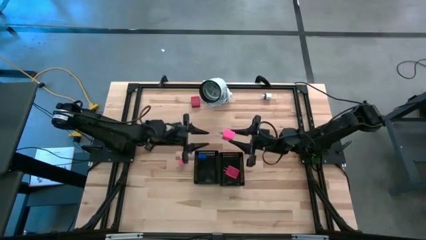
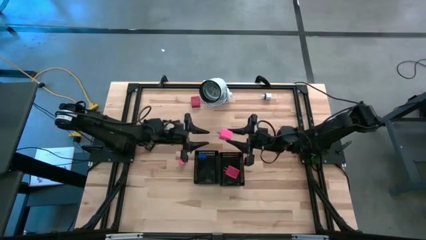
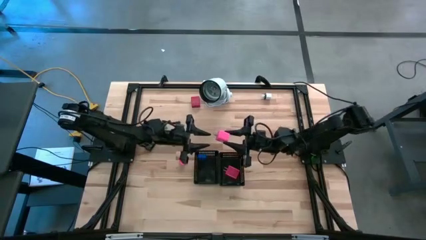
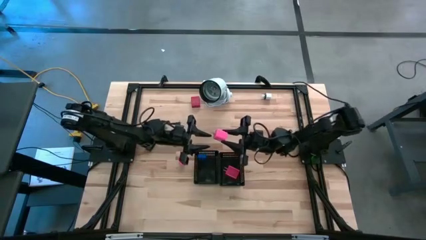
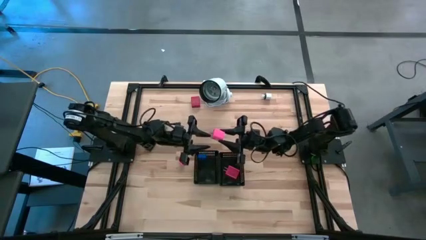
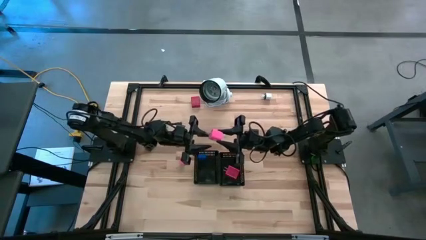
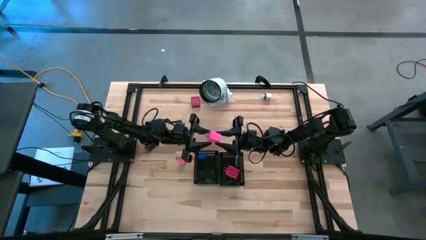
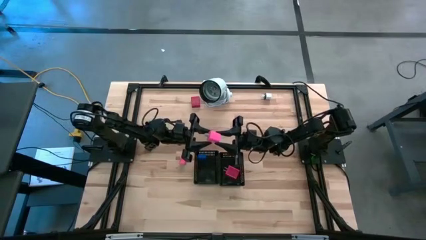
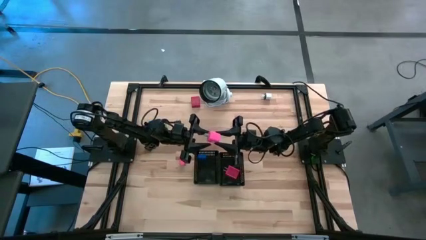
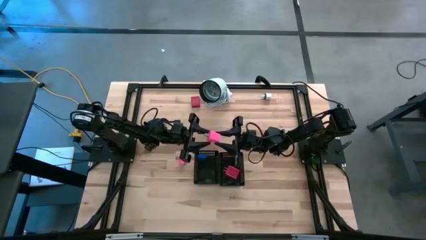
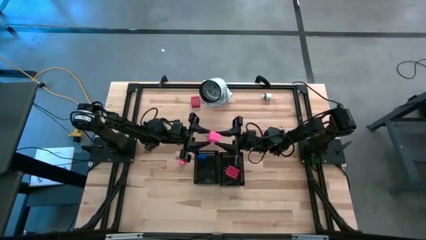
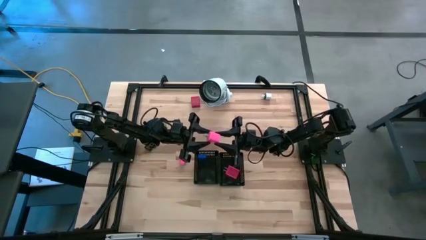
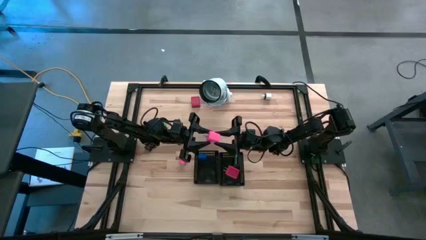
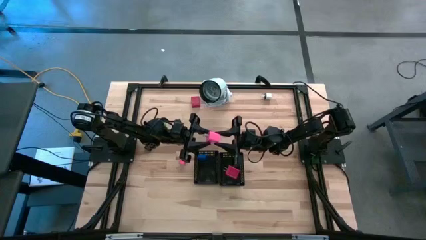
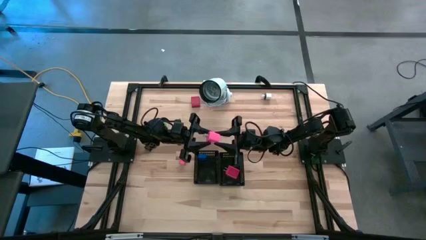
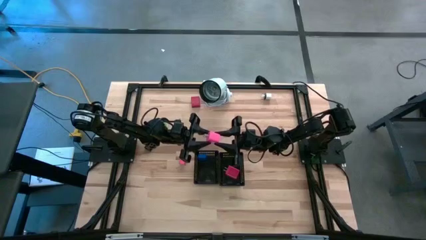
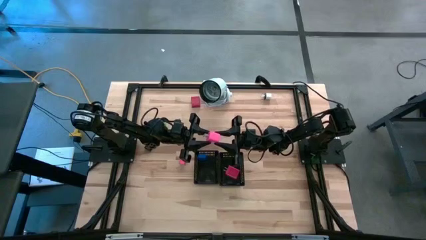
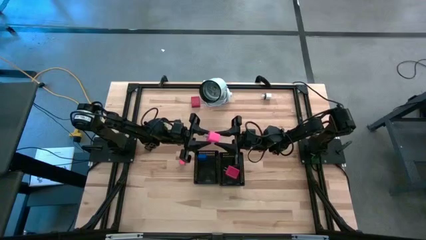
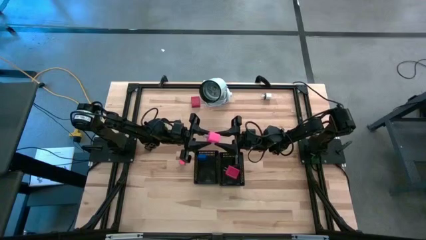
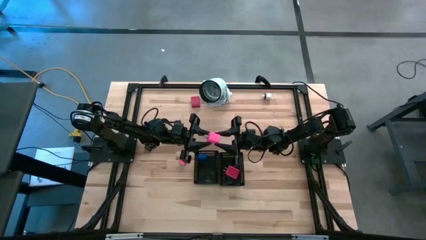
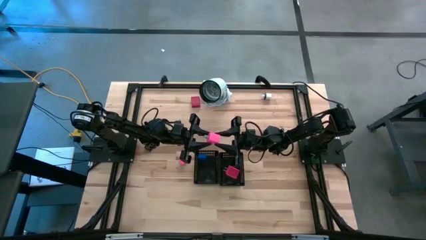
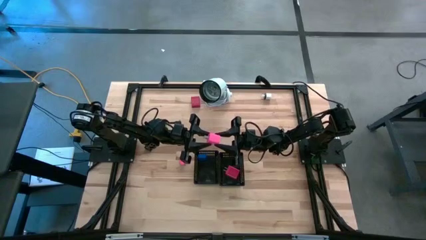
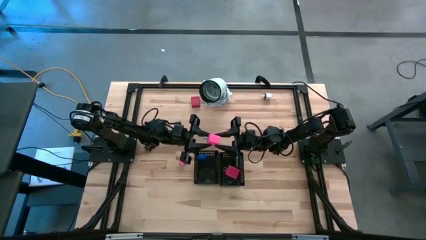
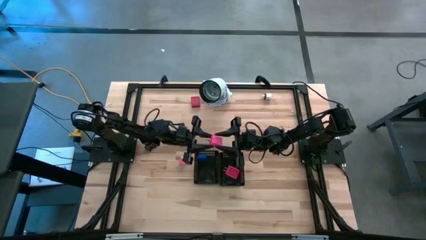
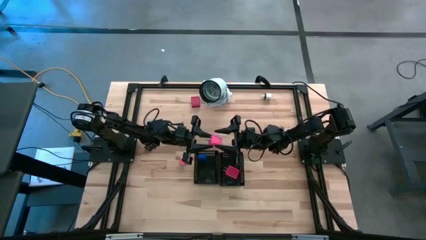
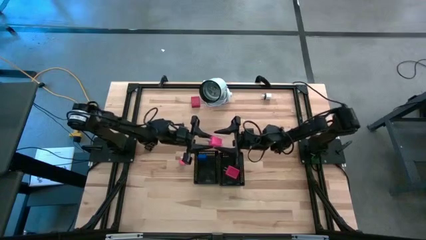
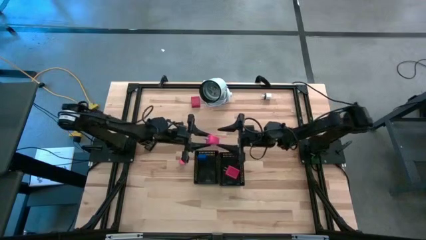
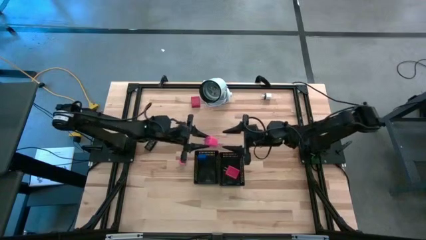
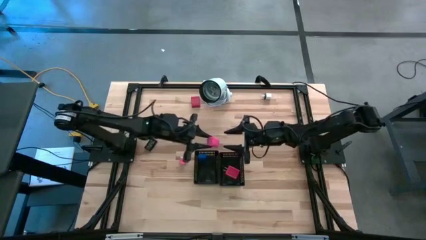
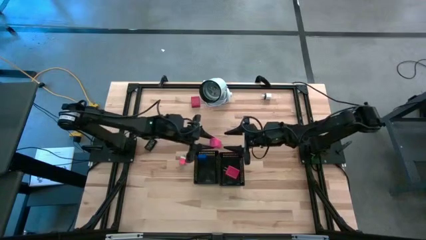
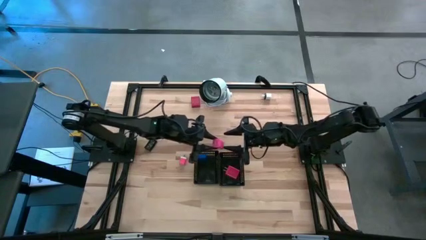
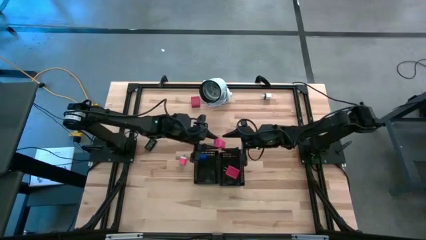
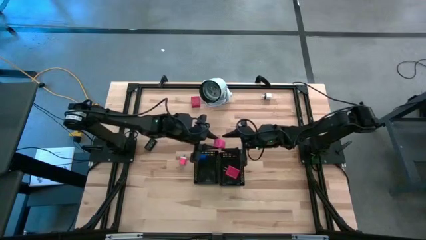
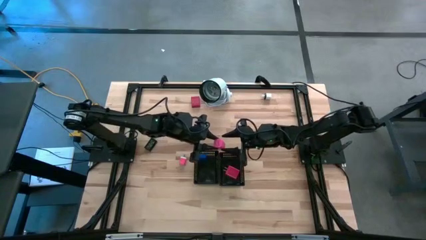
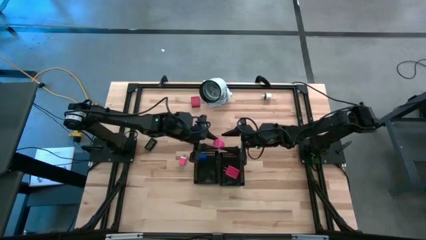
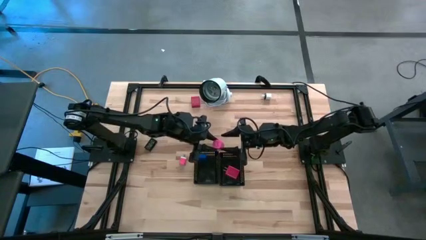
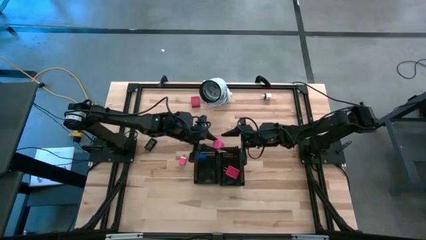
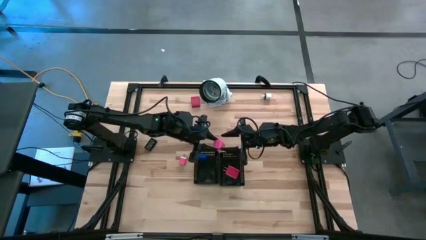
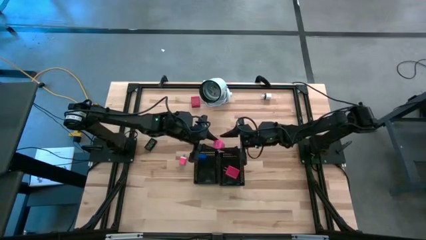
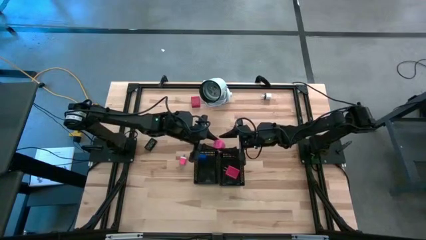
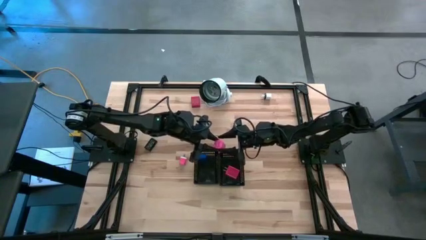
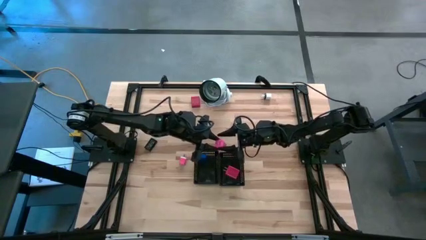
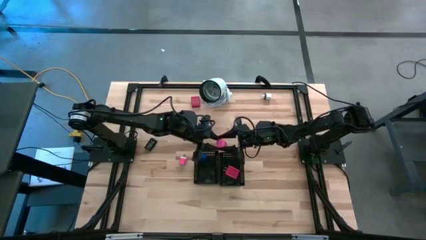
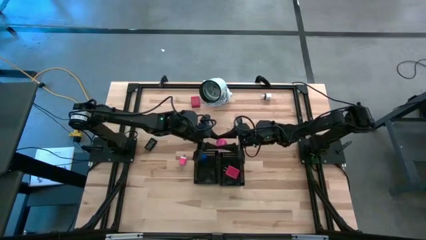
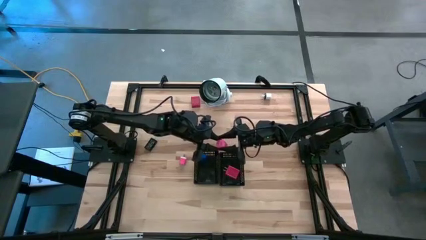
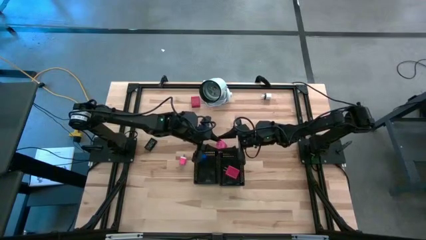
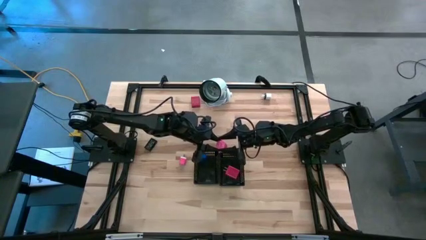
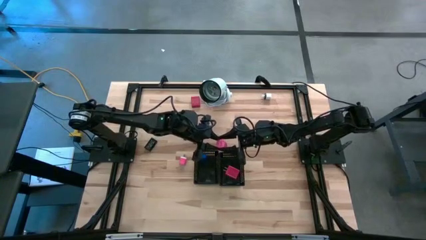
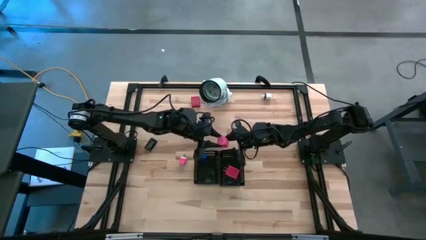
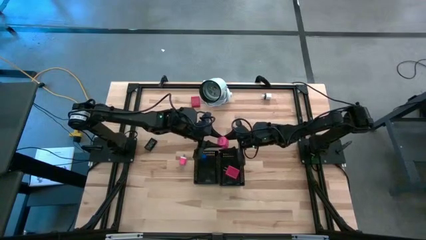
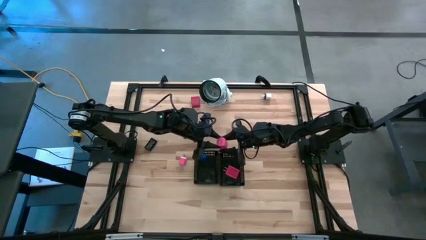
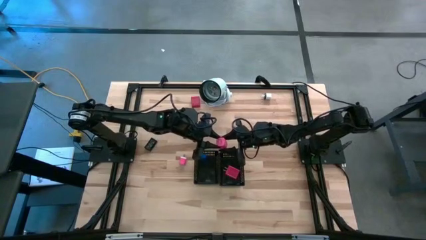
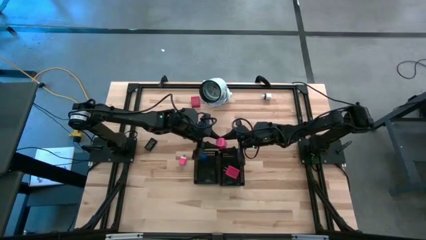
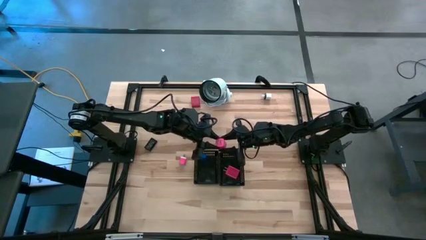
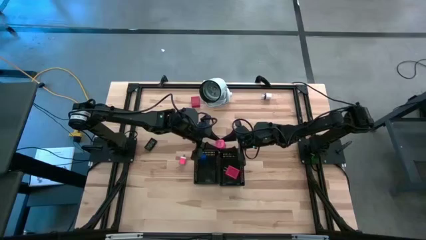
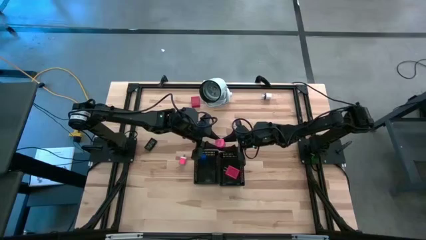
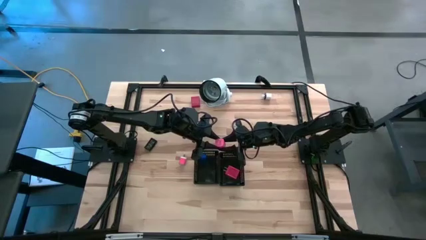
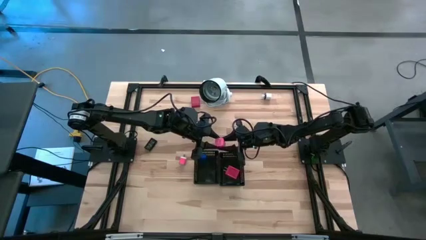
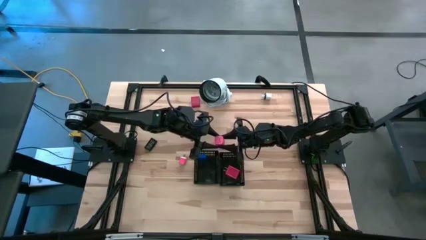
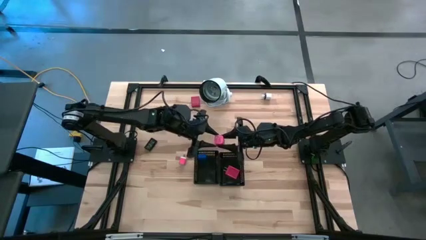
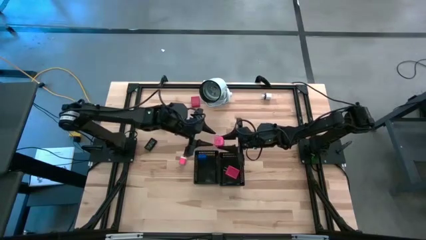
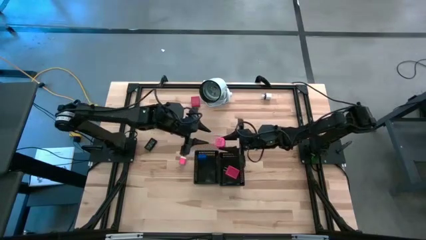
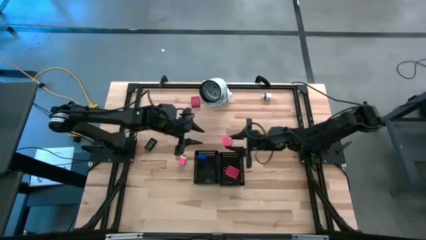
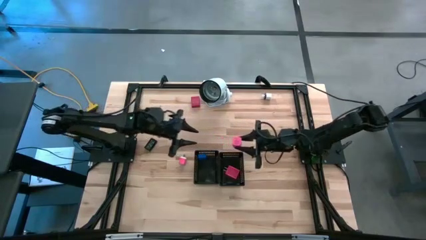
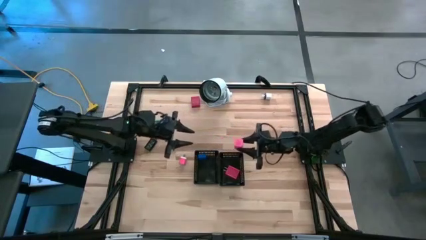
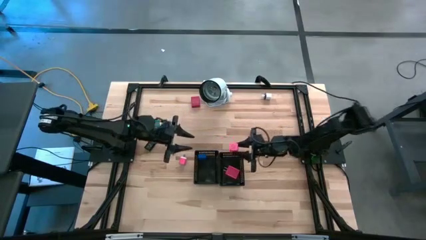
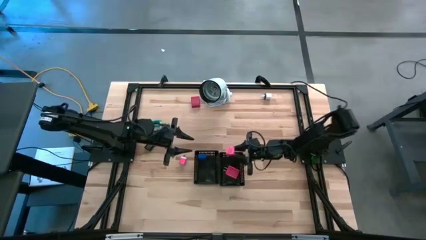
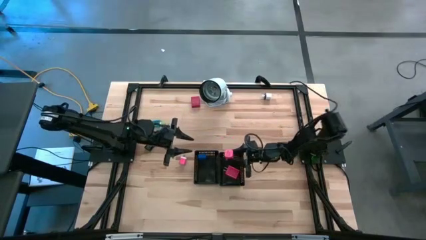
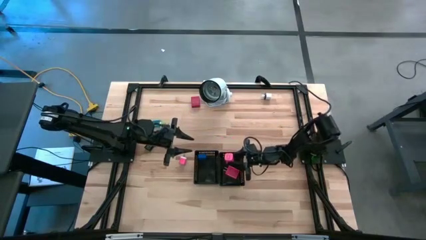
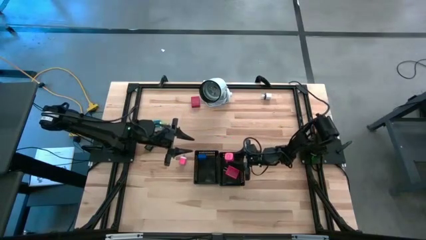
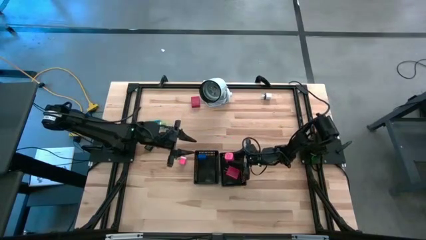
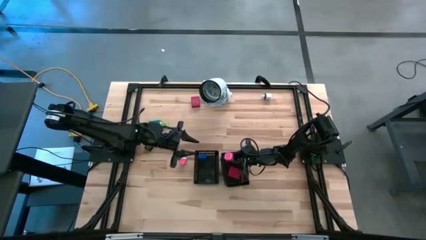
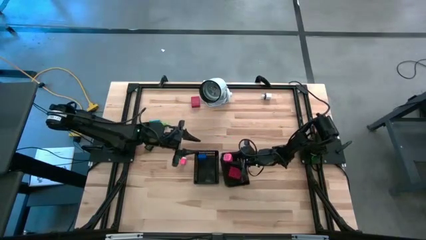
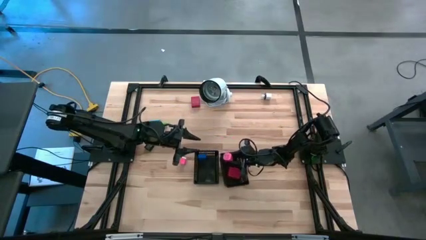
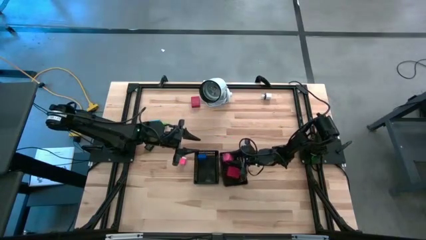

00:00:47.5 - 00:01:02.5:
Task: Pick & Place Office items
Put the pink charger adapter into the right black bin
